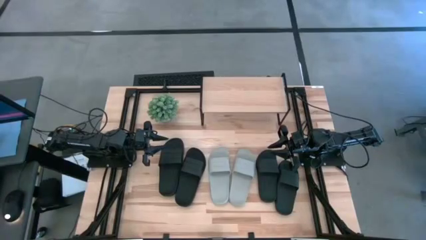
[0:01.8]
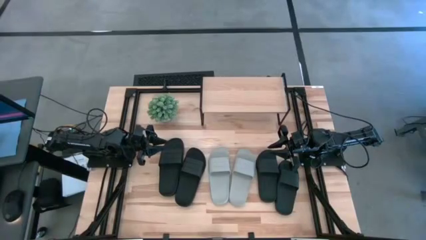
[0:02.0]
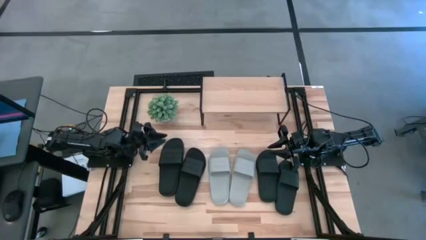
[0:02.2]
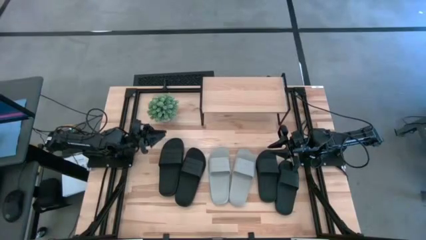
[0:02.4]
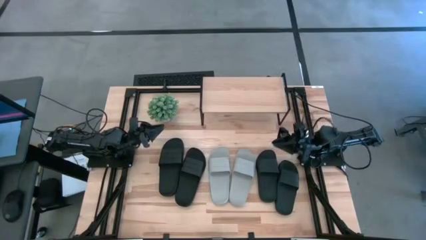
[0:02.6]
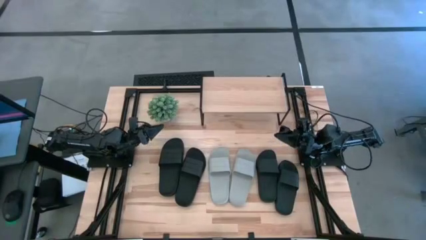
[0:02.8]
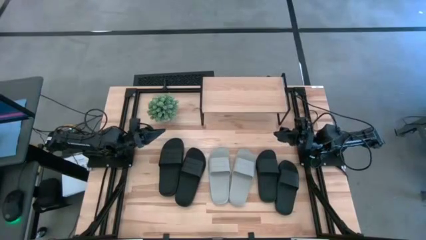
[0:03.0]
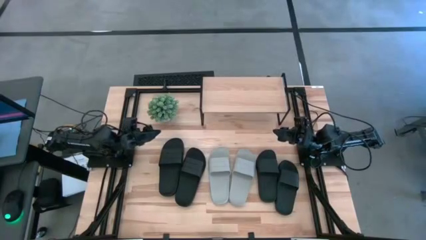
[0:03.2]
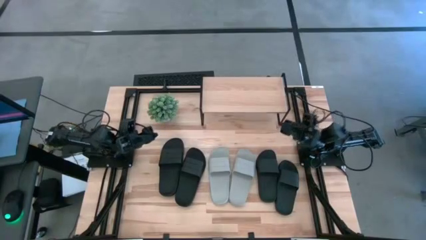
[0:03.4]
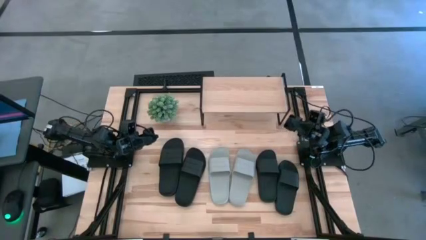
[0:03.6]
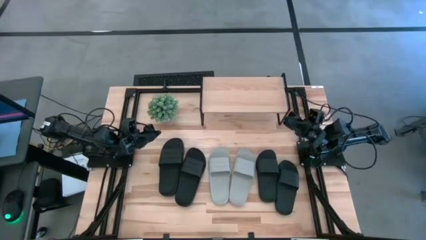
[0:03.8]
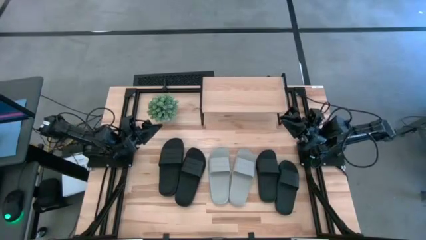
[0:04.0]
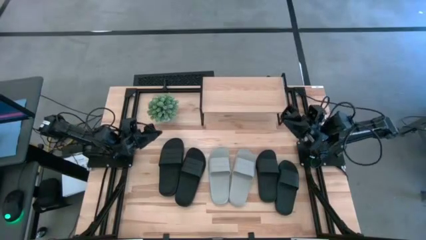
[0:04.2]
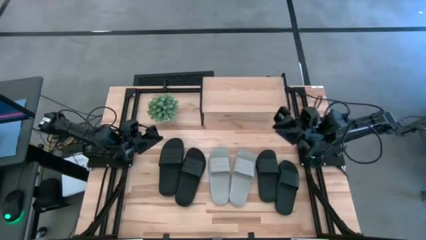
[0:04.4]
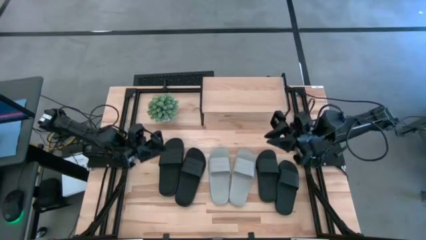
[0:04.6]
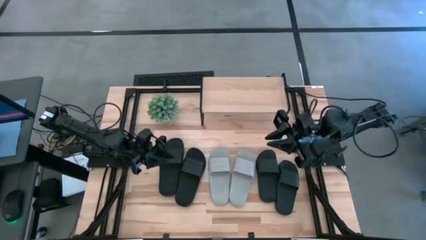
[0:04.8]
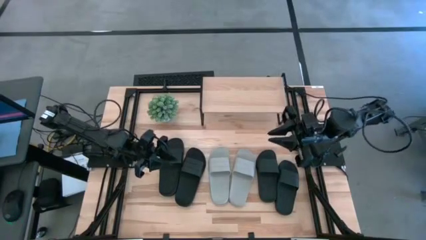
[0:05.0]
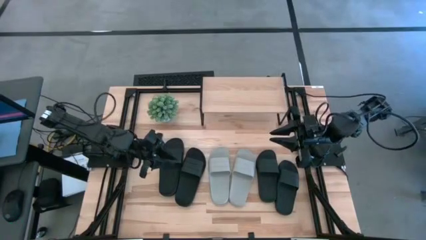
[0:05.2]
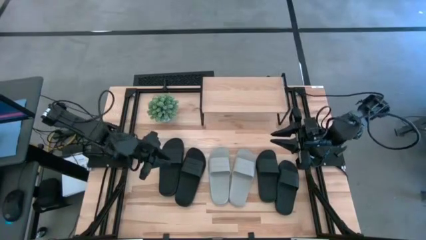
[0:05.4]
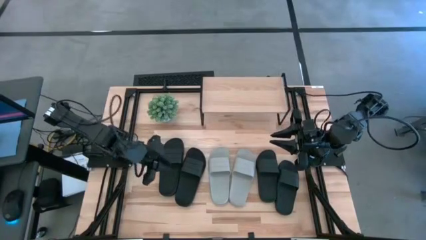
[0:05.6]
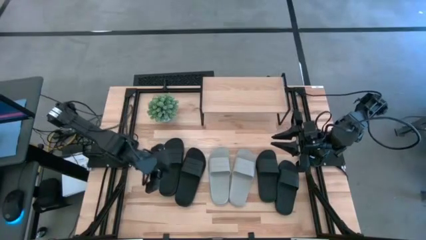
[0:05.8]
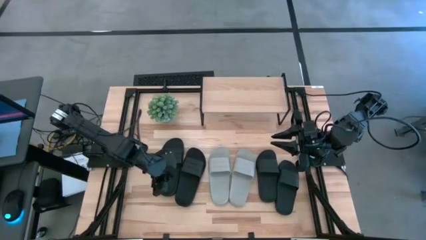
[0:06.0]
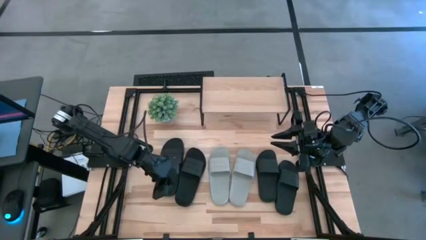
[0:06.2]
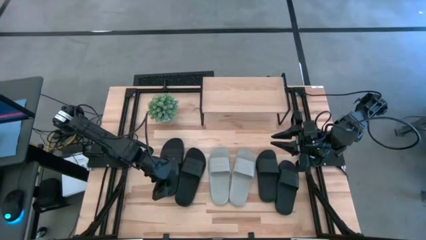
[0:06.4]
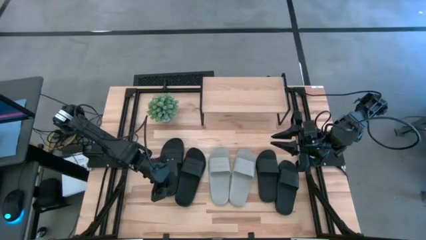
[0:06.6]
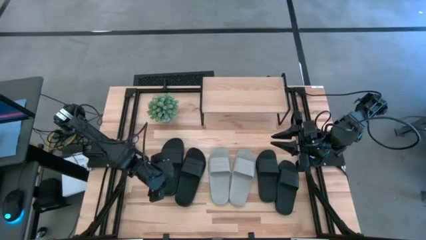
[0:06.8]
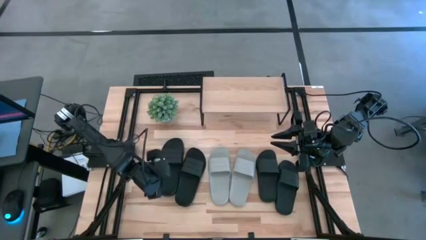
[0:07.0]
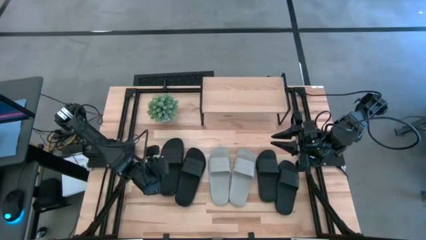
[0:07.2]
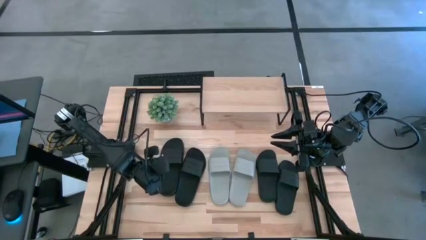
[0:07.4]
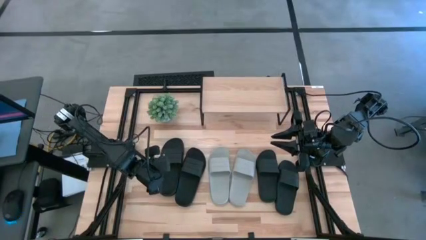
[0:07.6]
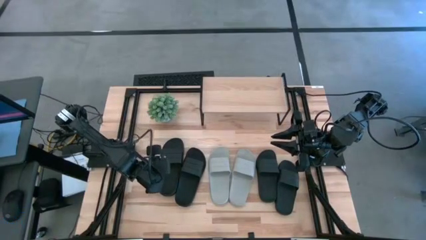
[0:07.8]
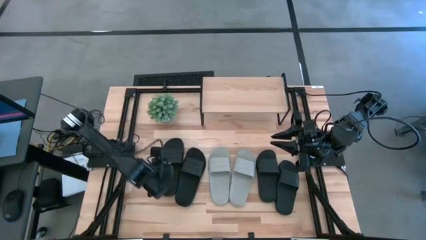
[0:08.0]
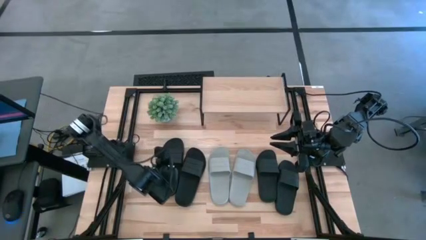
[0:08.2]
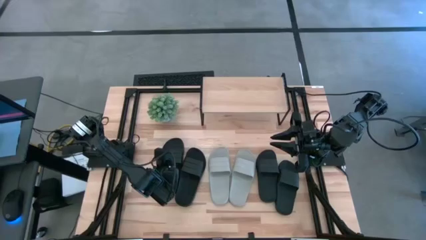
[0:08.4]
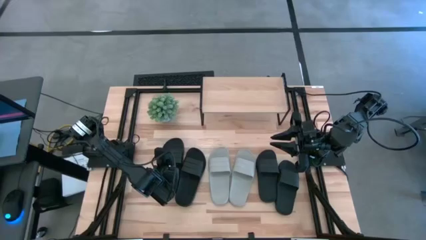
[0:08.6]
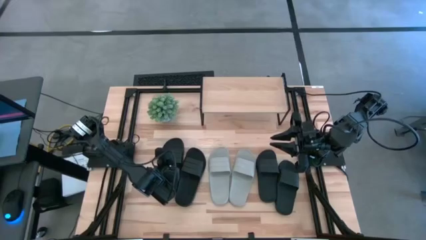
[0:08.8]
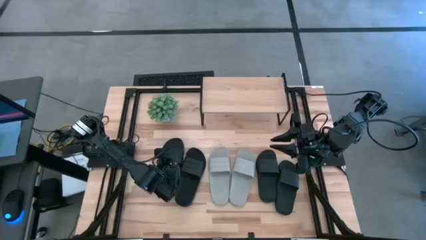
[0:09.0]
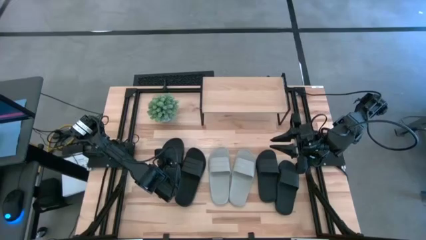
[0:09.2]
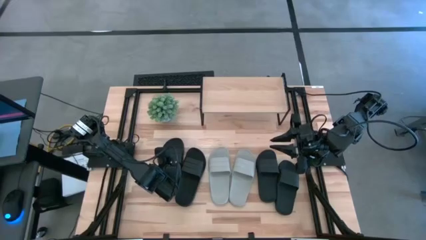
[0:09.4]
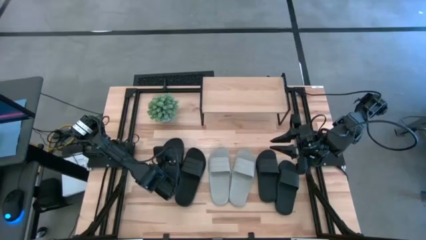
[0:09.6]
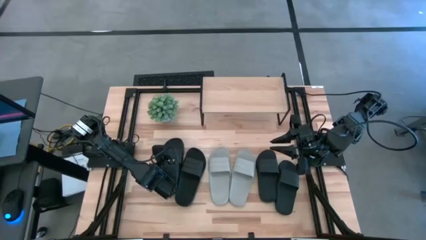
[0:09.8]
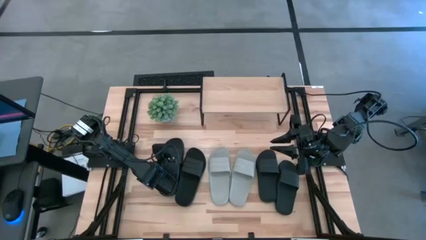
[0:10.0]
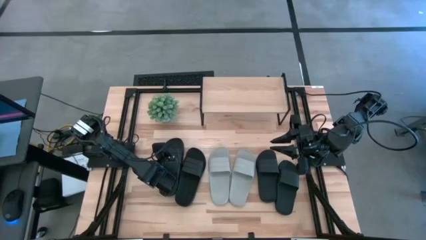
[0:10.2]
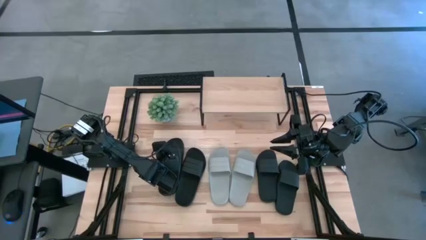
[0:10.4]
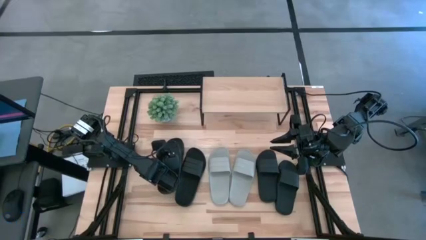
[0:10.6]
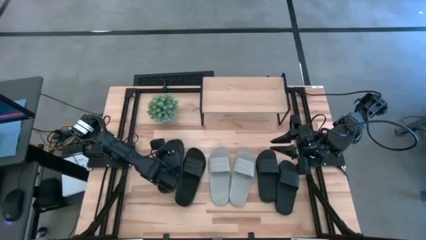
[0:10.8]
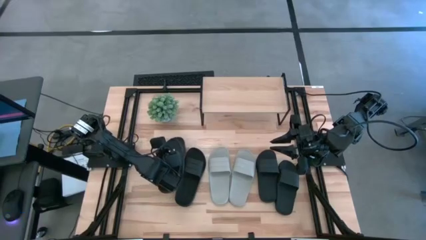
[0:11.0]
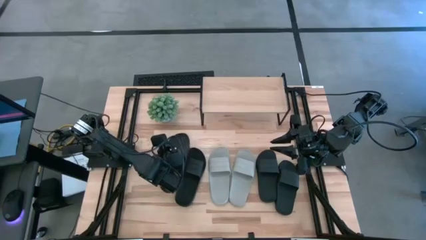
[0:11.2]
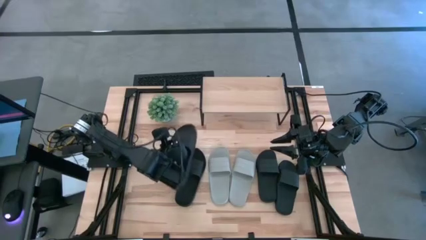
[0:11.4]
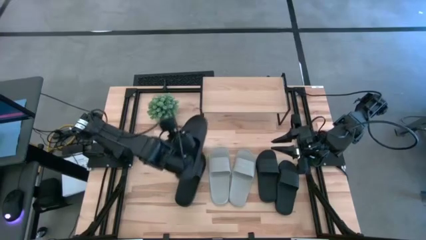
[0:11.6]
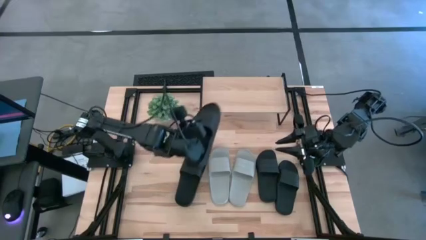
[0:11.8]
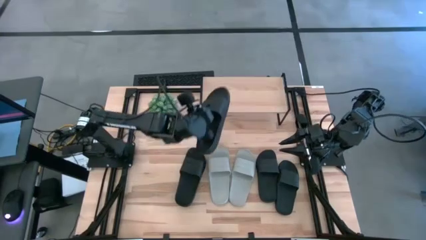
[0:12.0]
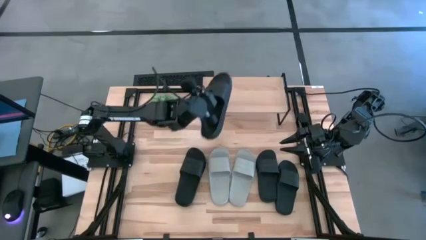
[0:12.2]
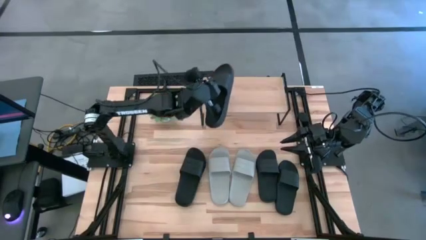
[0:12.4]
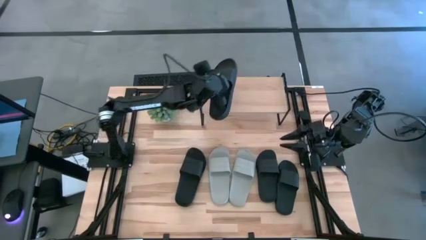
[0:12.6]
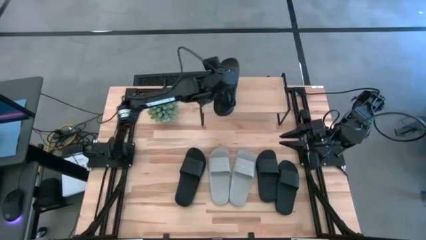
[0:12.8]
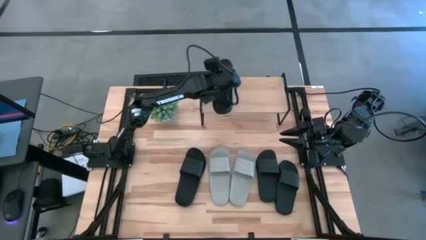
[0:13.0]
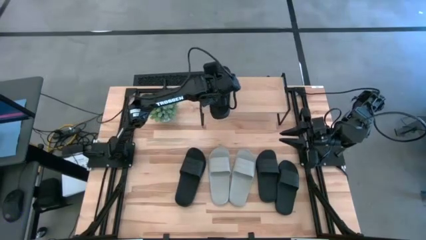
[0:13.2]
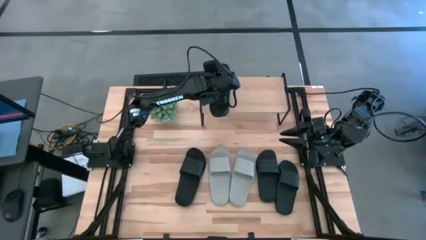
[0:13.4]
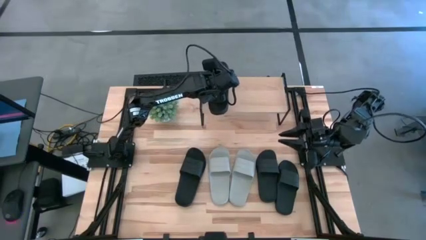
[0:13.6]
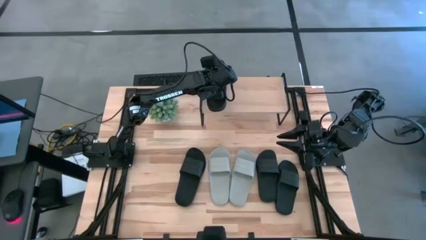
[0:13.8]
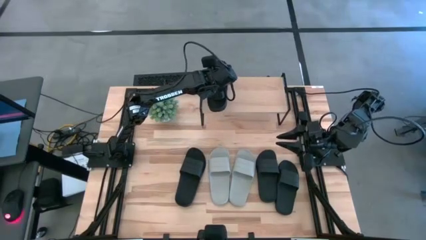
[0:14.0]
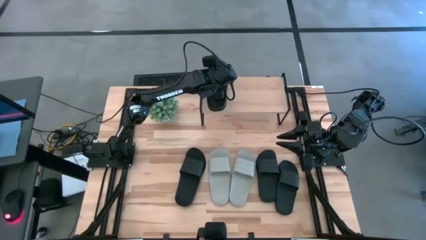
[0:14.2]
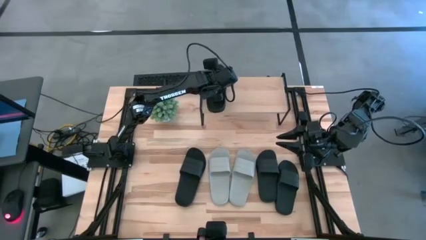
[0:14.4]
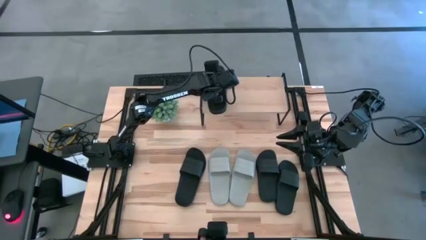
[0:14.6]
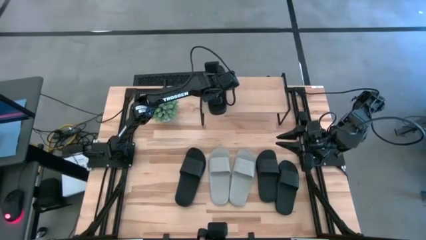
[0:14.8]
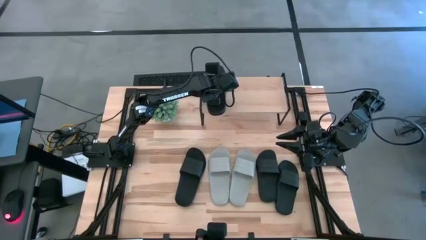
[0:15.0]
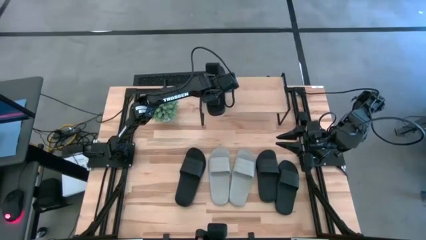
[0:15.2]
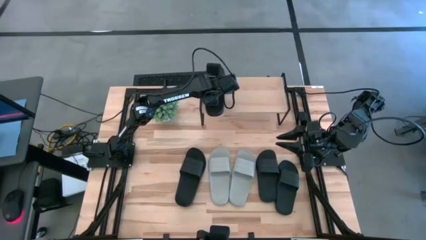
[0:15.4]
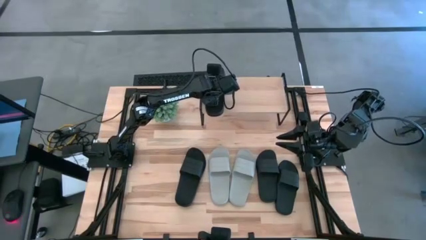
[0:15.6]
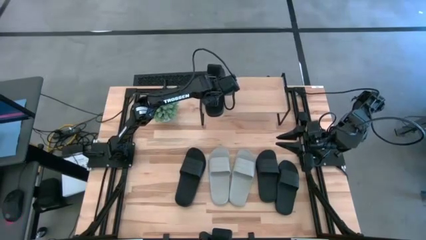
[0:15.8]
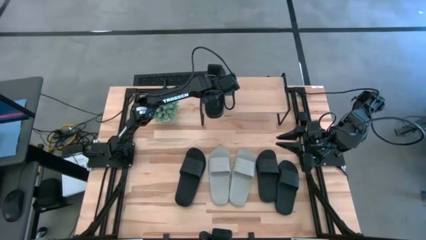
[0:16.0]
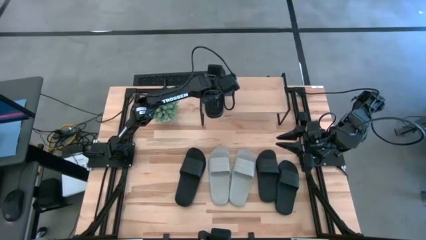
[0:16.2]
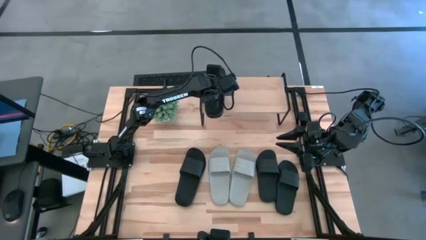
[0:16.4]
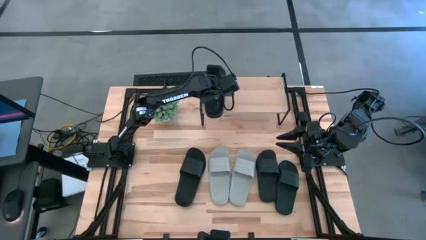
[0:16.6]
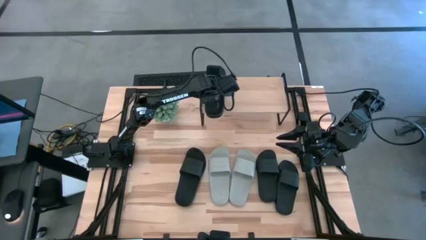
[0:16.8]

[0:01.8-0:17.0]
Task: Pick and place slides into the shelf
Put the black slide on the shelf
